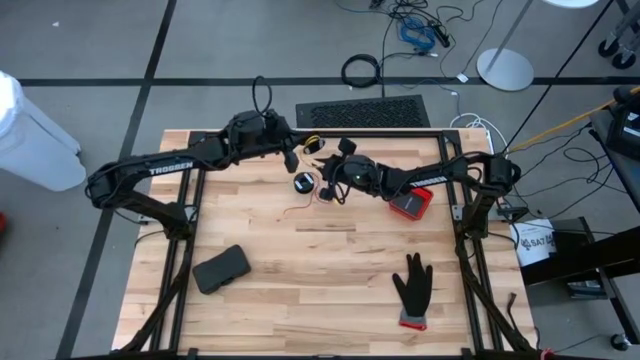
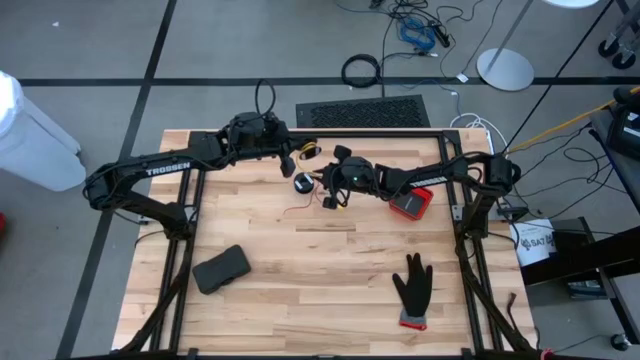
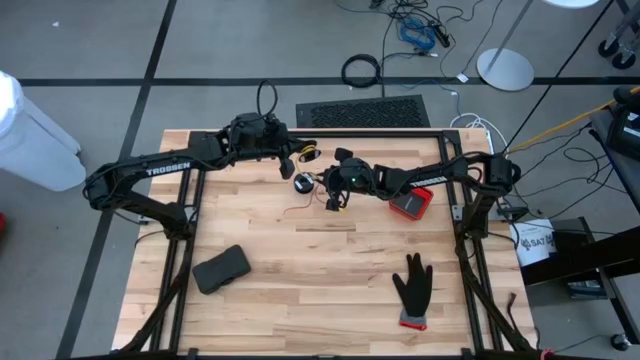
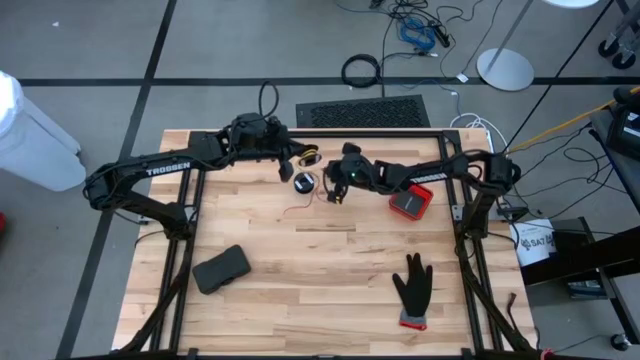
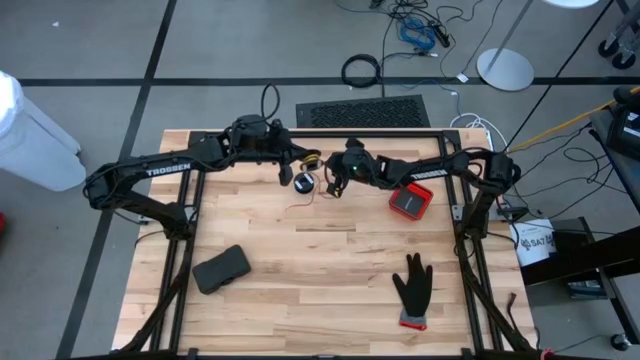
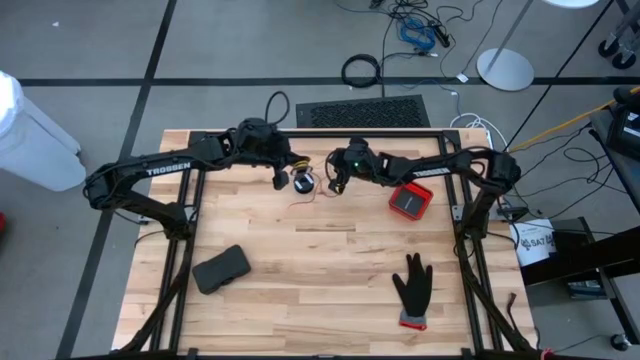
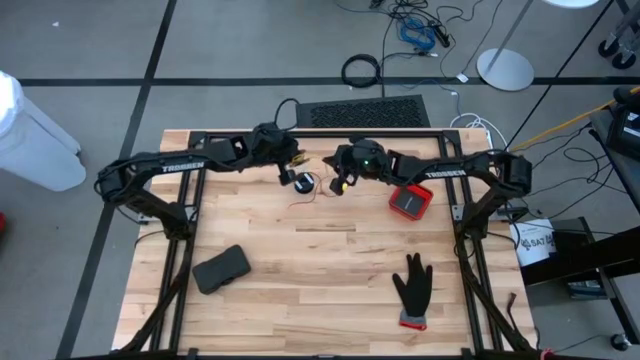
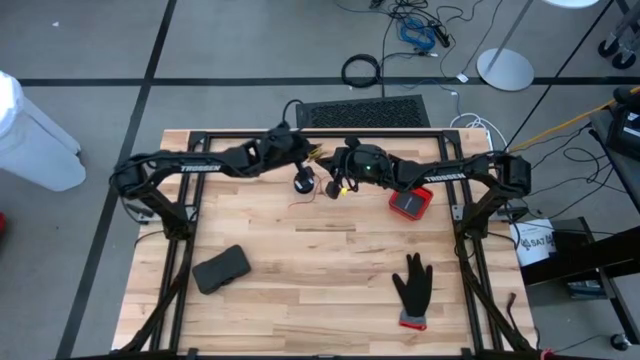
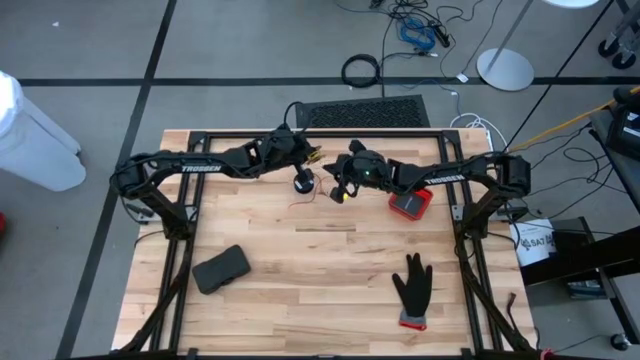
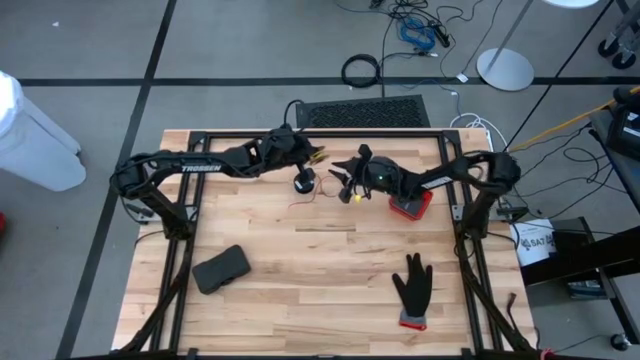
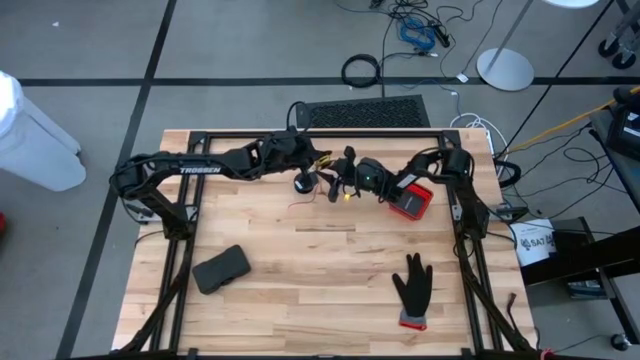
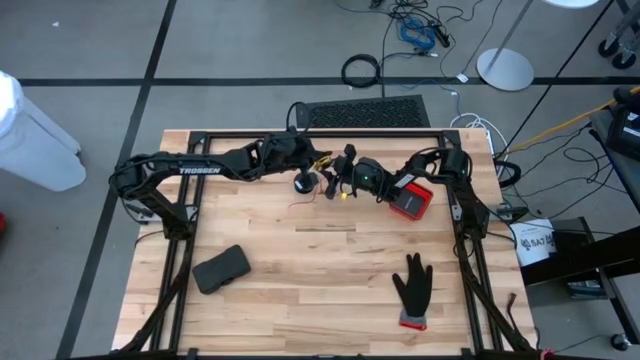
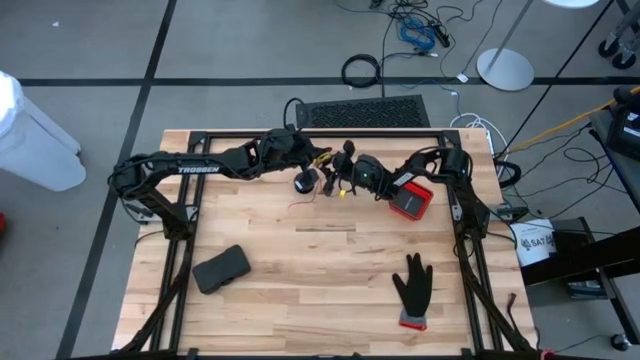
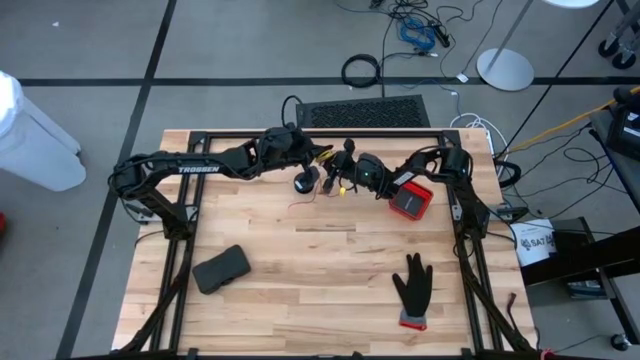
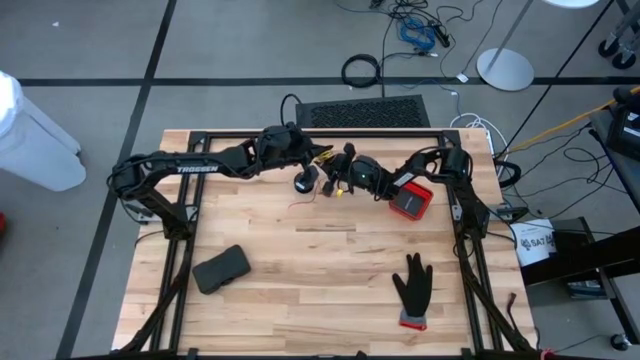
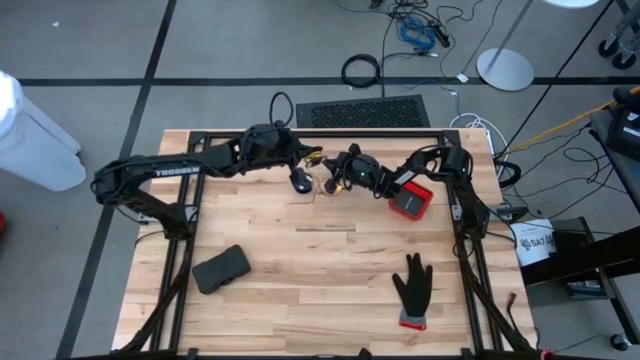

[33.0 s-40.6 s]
Task: Coil cords
Coil the yellow wire onto the black spool

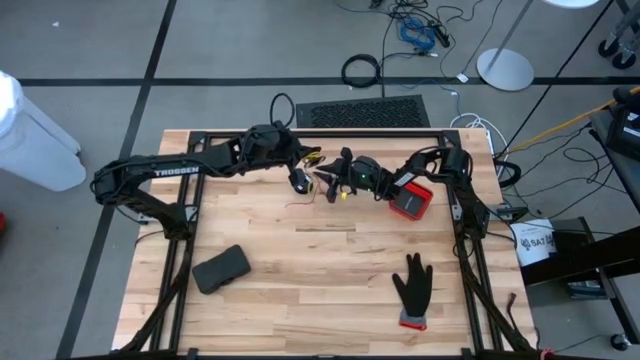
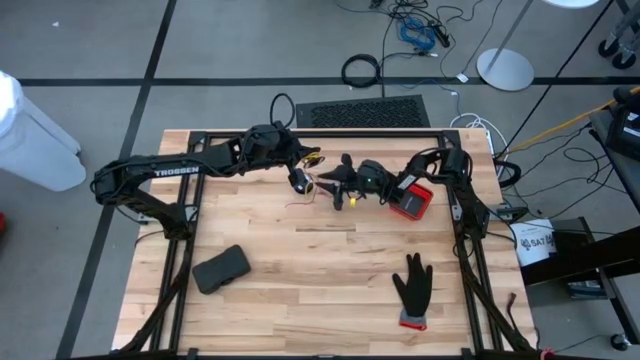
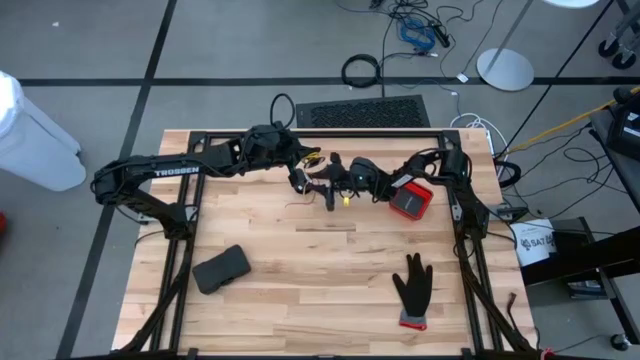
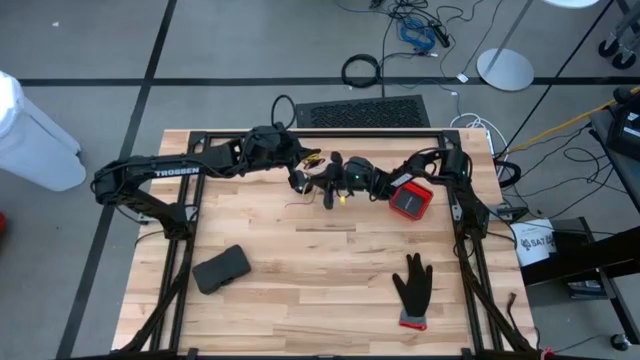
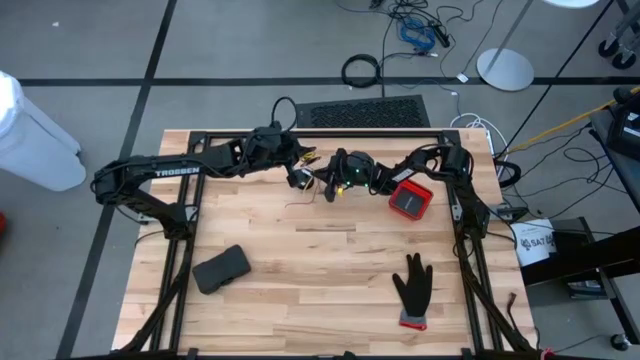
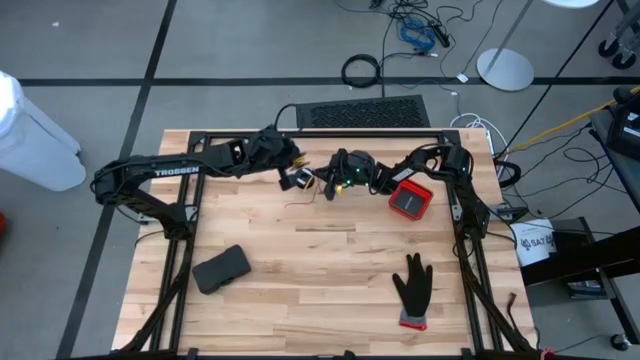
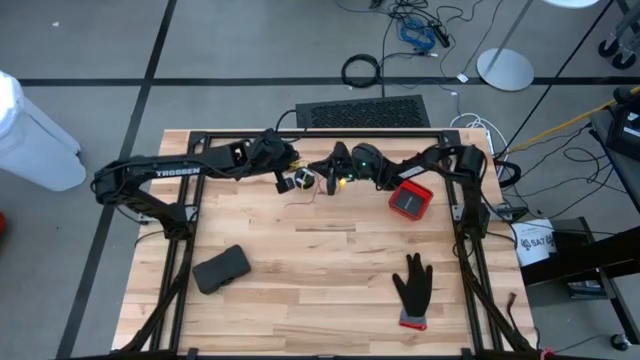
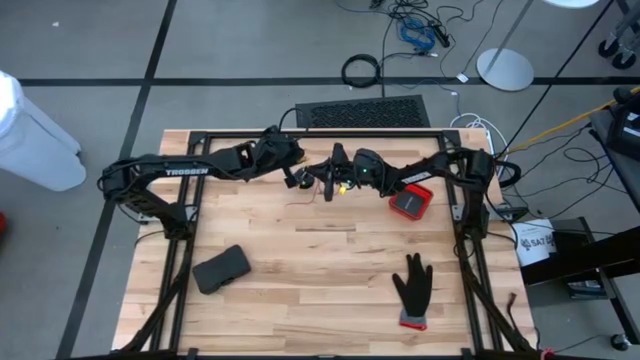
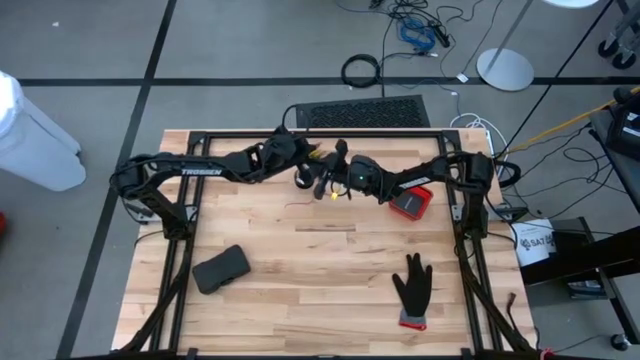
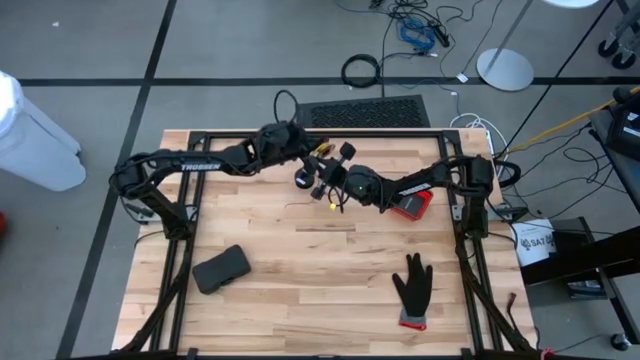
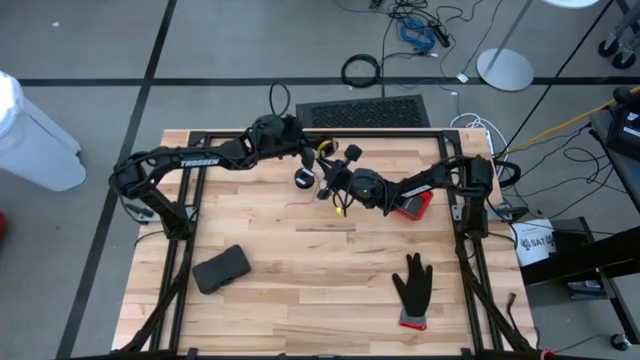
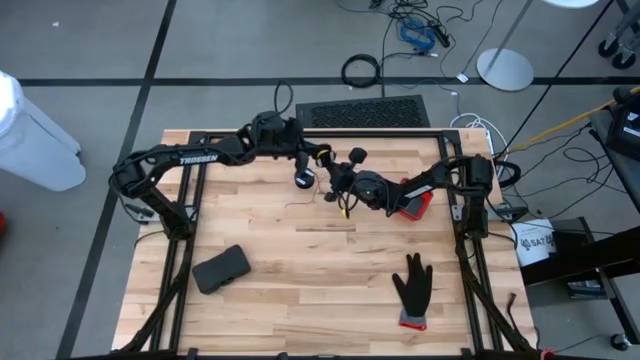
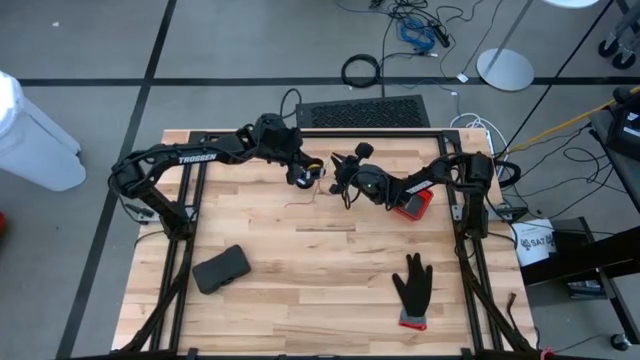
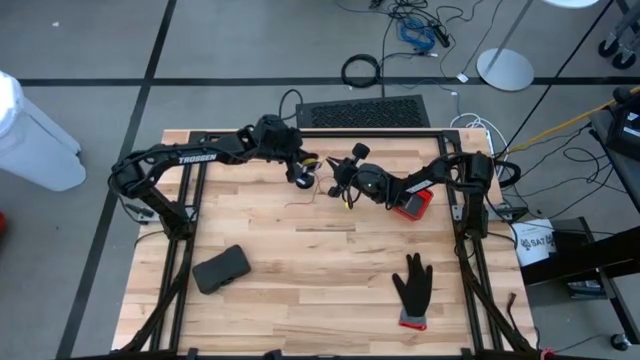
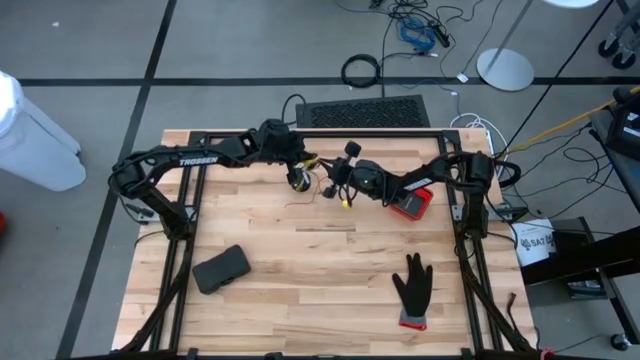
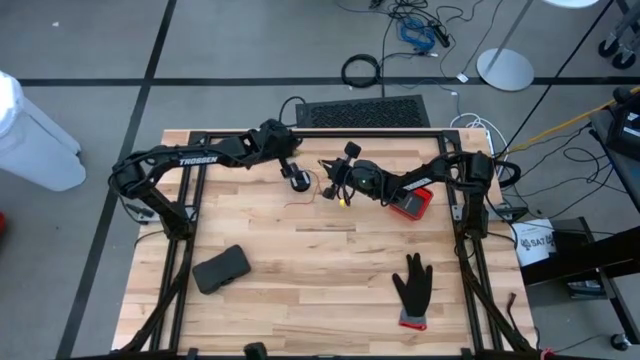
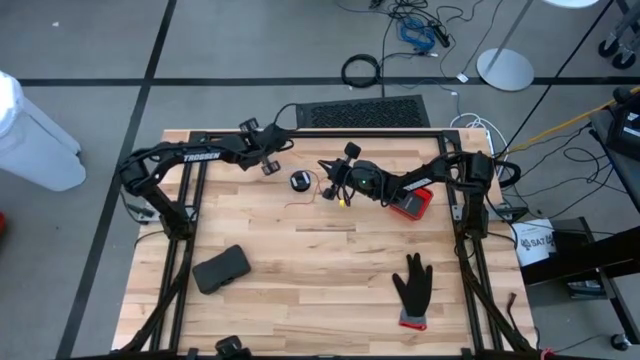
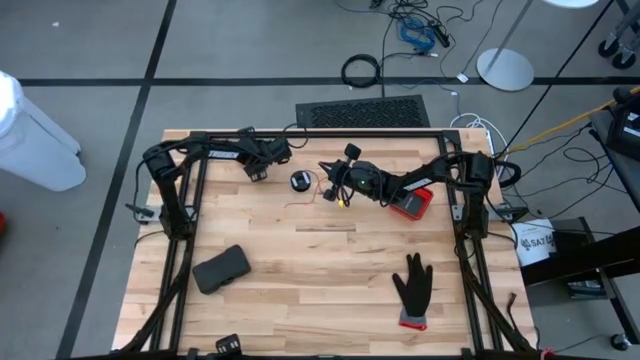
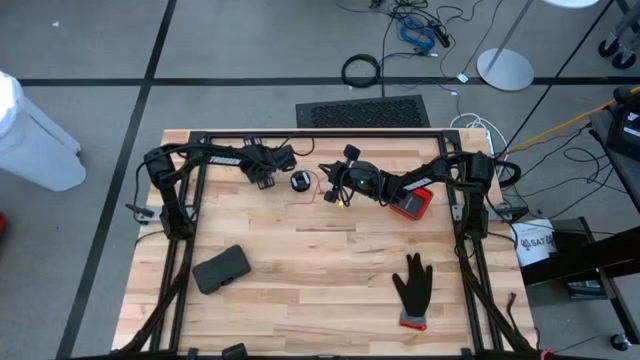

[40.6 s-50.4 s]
Coil the yellow wire onto the black spool
